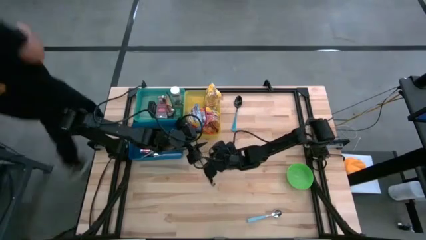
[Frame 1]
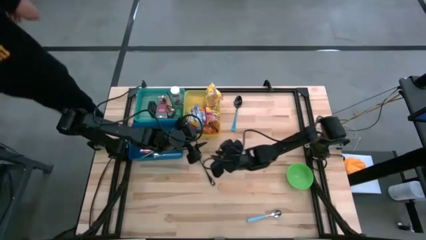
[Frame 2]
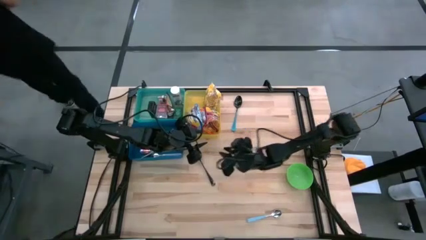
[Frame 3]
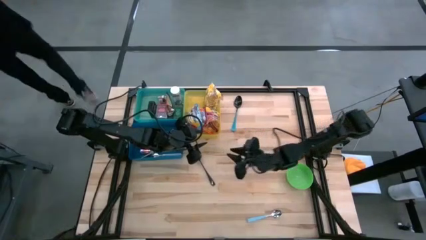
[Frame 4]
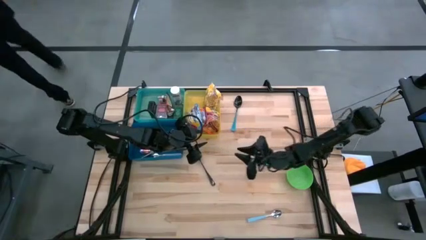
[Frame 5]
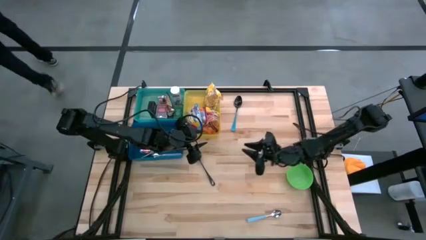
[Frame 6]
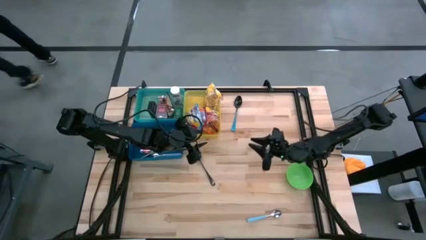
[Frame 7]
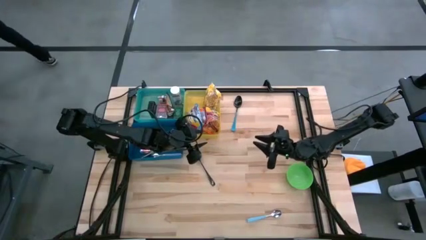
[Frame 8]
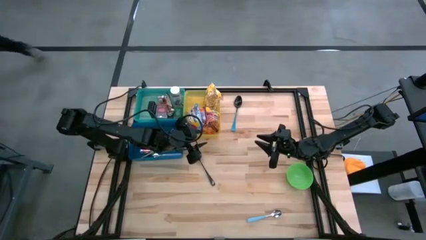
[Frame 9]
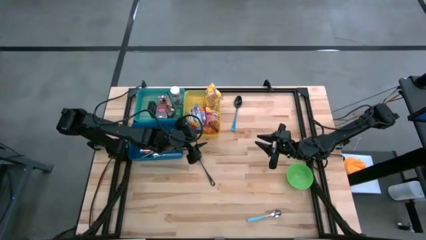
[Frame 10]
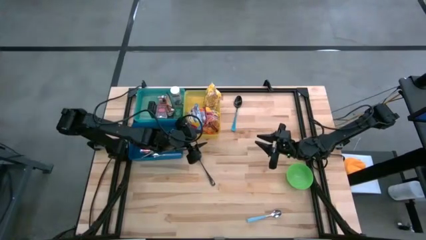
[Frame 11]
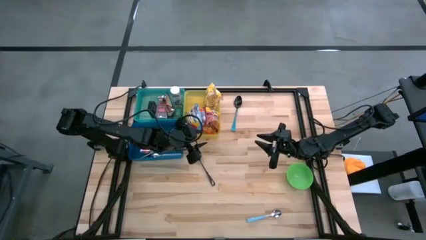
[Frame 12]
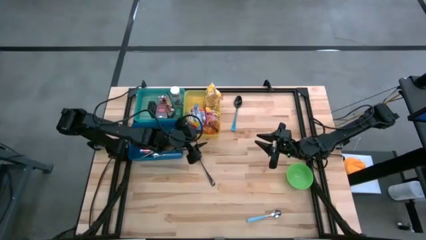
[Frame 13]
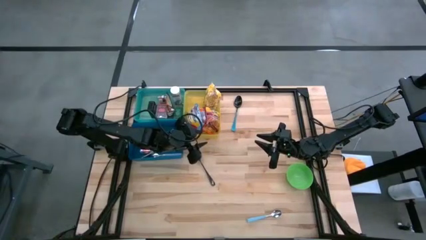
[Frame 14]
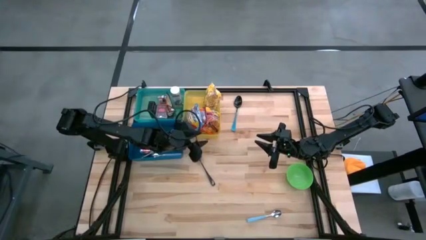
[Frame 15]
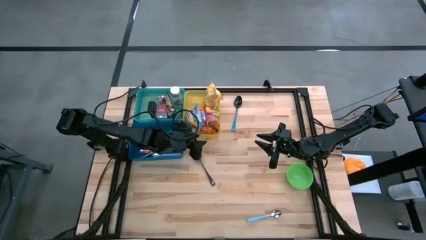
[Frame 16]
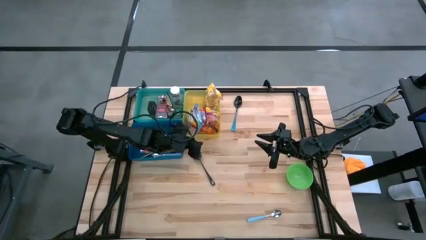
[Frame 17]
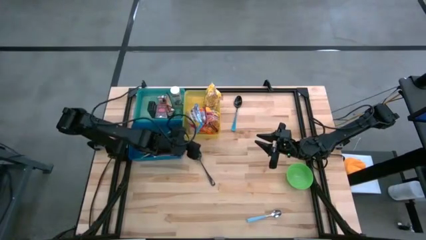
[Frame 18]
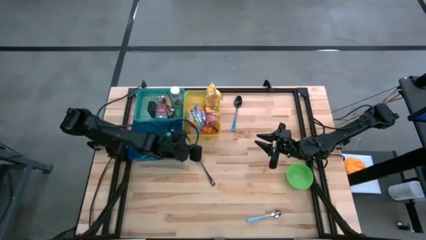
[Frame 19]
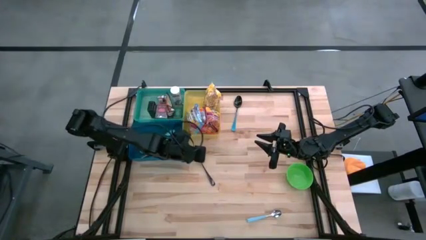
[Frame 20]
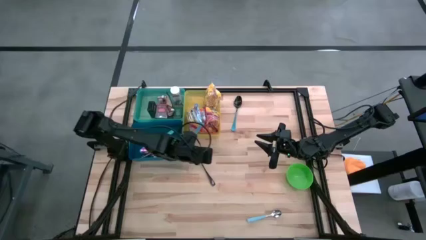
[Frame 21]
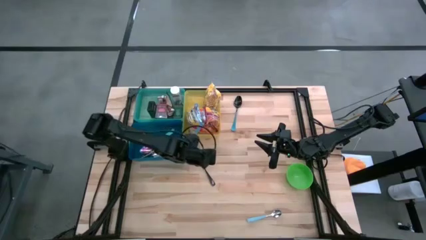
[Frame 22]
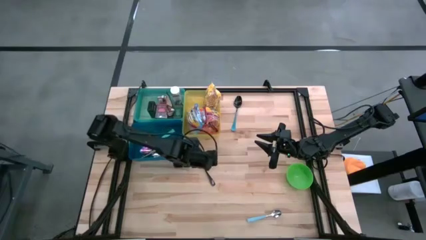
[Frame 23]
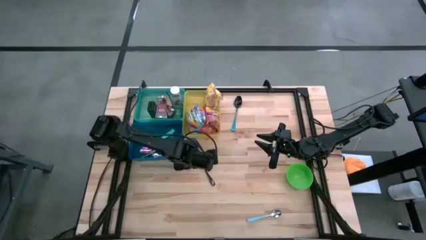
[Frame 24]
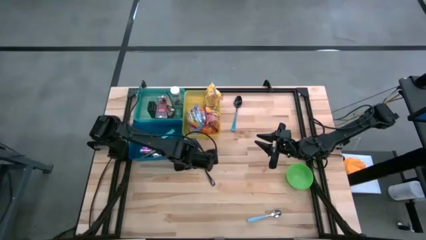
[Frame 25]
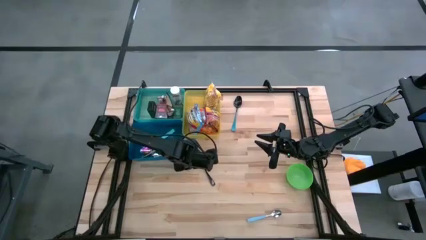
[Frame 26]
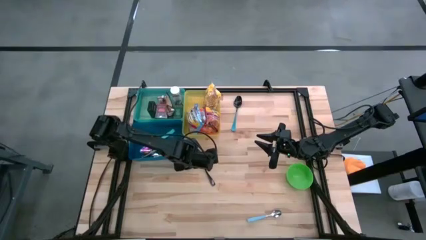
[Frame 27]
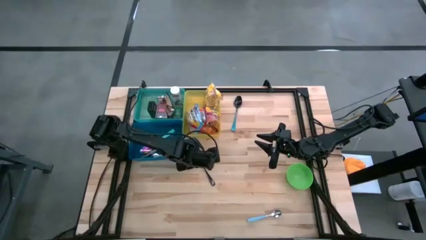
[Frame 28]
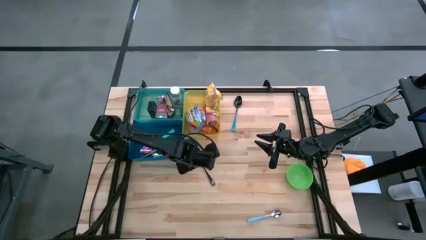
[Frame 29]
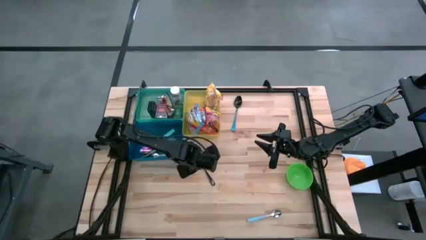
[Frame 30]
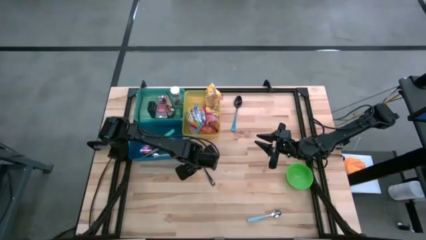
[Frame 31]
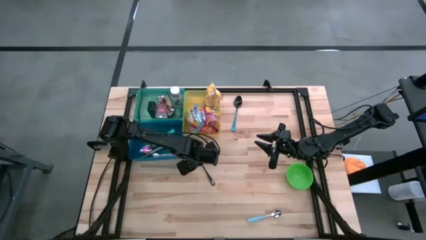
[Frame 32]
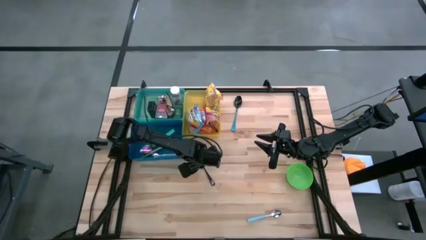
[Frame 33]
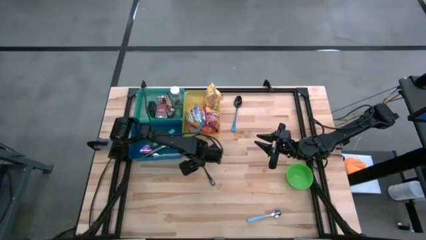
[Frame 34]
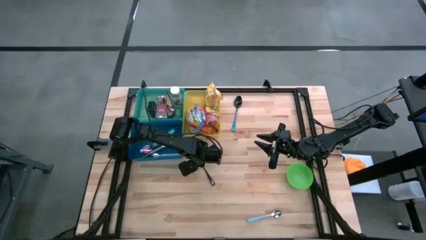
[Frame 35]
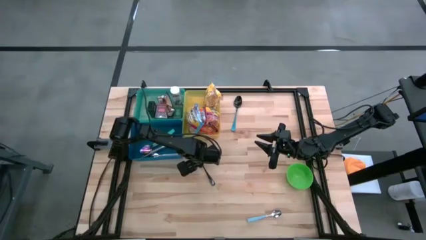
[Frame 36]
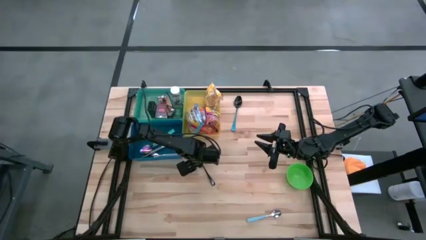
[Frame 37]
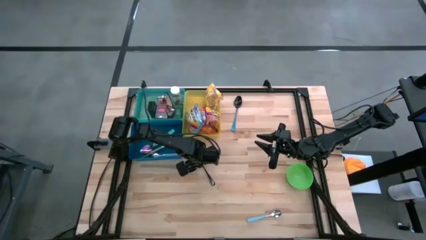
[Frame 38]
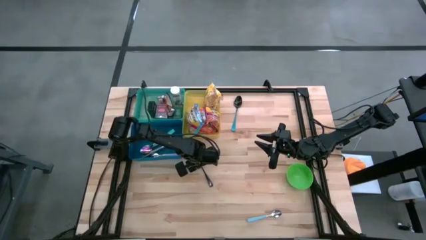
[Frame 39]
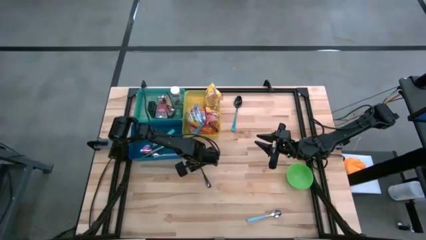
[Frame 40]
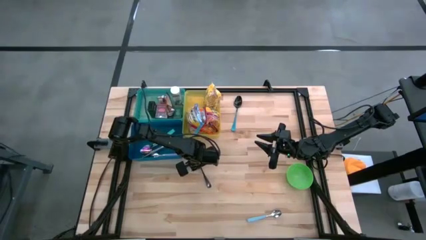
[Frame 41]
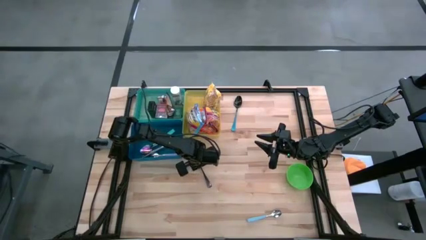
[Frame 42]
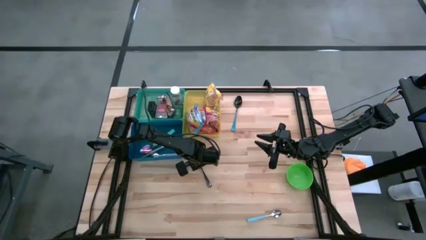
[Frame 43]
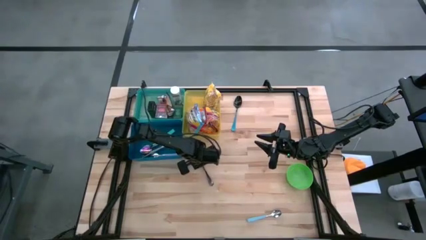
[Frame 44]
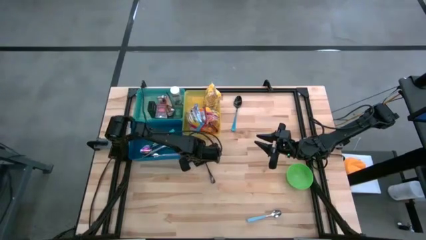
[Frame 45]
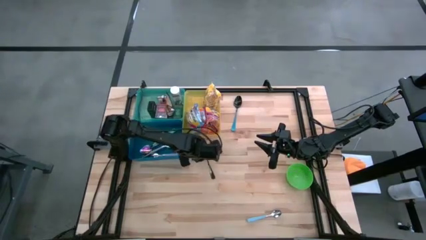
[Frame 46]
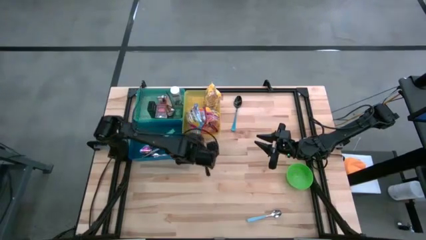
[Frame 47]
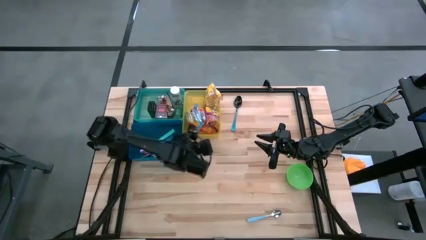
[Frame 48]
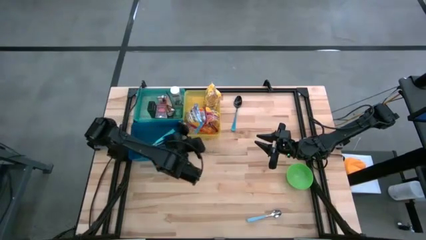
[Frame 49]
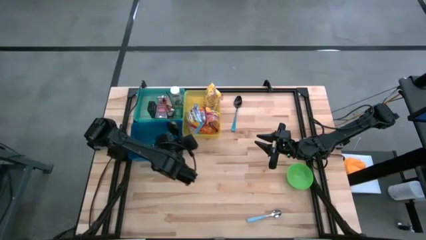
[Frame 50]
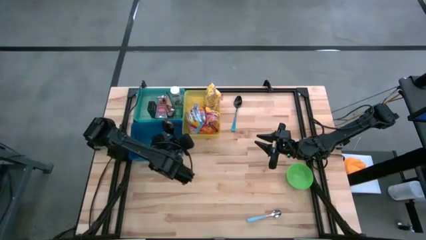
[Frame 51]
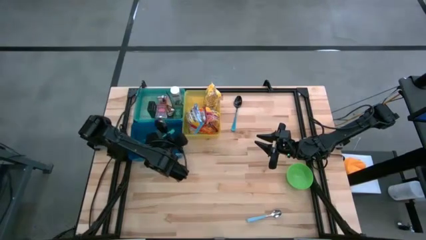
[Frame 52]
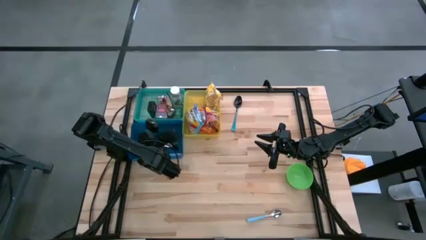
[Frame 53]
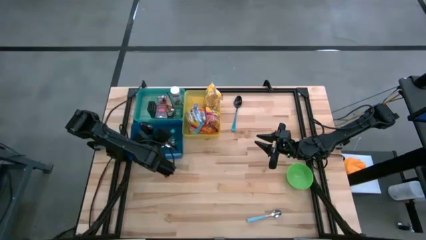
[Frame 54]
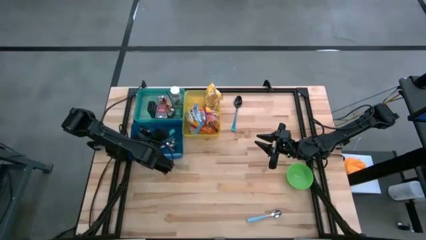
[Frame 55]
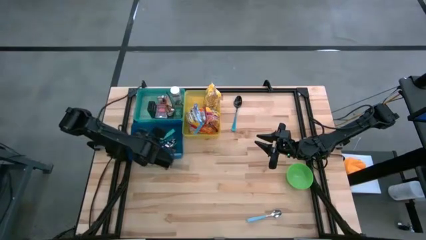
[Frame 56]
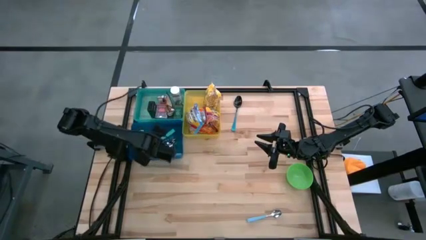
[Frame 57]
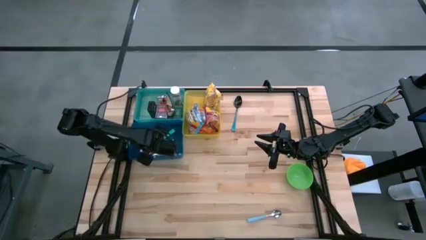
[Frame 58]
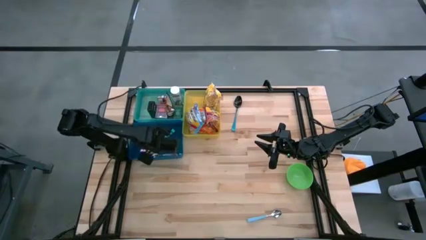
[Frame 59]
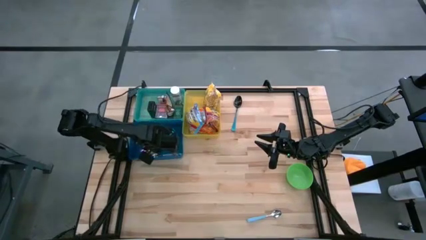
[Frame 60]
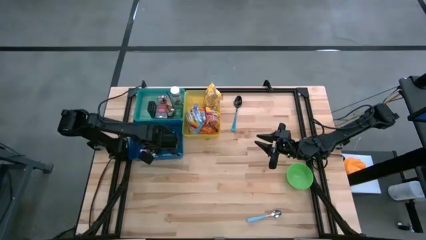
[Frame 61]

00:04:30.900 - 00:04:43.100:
Put the black spoon into the blue bin
